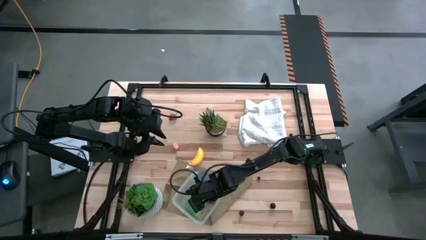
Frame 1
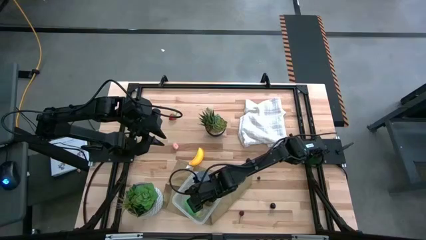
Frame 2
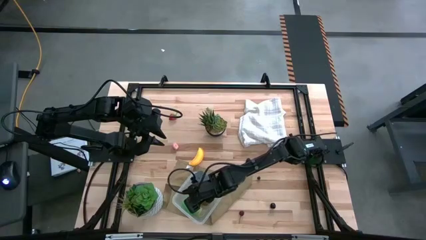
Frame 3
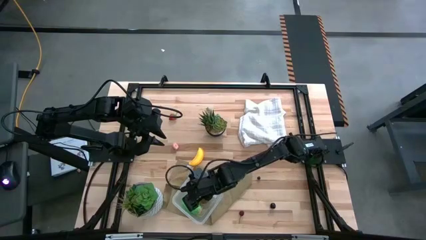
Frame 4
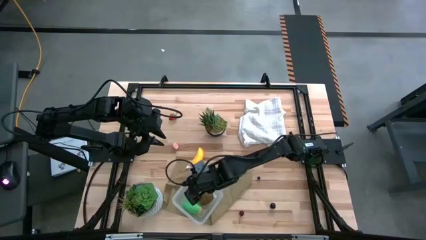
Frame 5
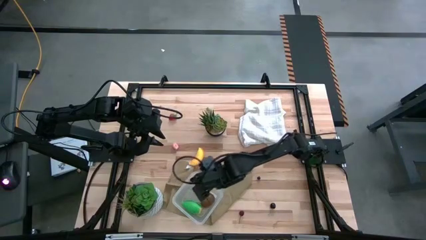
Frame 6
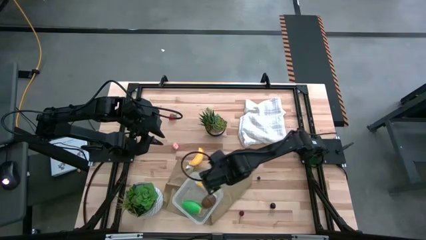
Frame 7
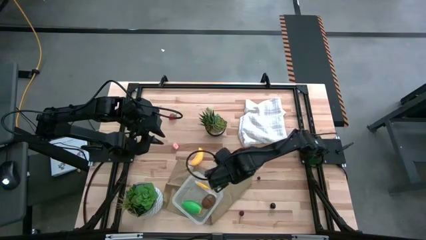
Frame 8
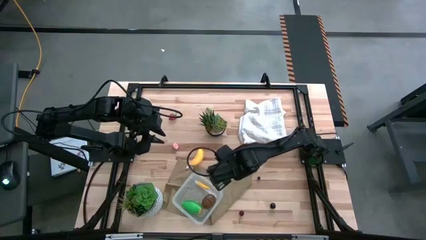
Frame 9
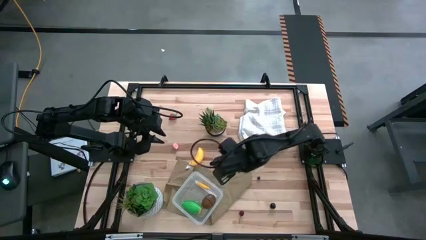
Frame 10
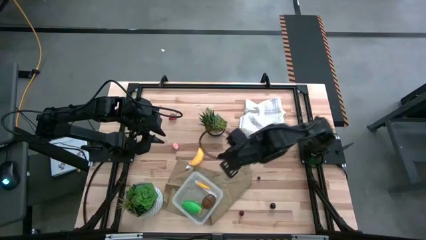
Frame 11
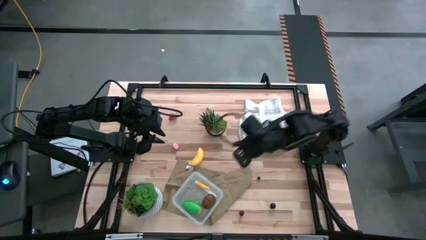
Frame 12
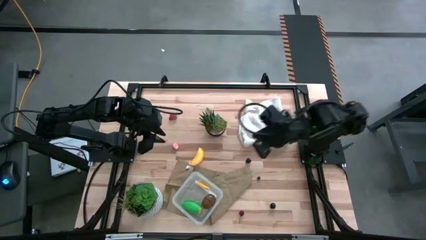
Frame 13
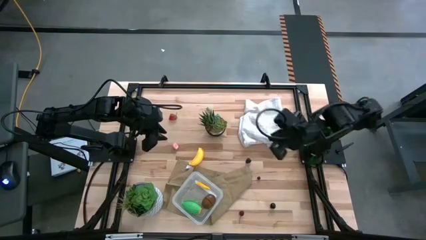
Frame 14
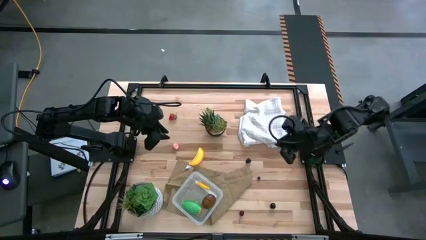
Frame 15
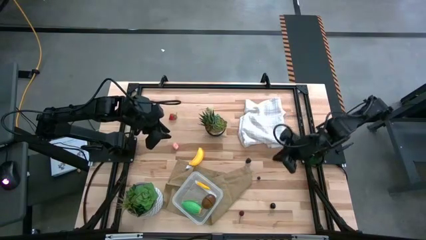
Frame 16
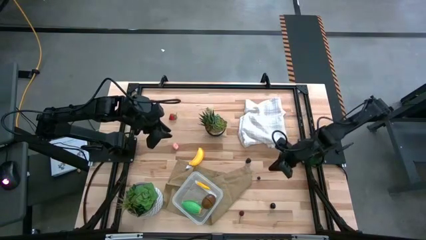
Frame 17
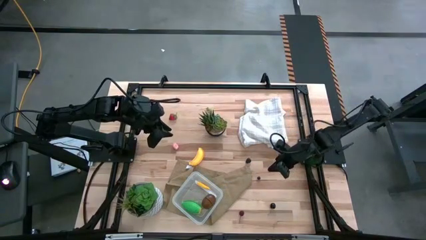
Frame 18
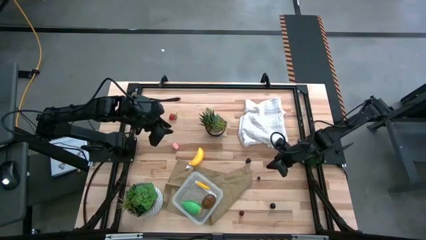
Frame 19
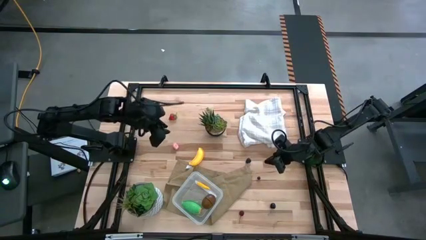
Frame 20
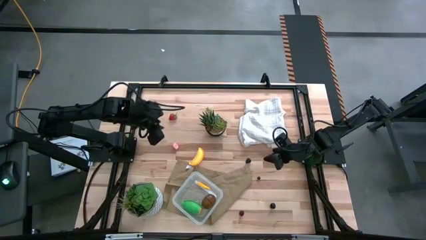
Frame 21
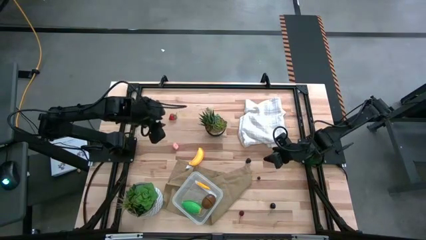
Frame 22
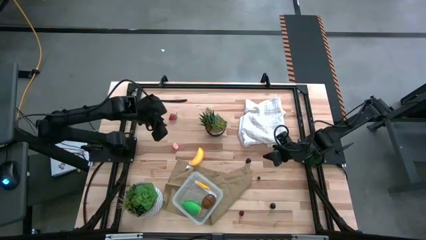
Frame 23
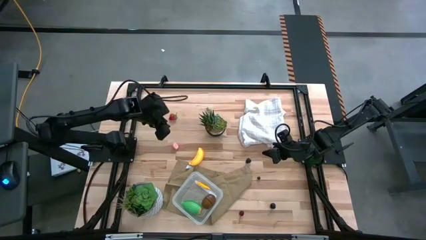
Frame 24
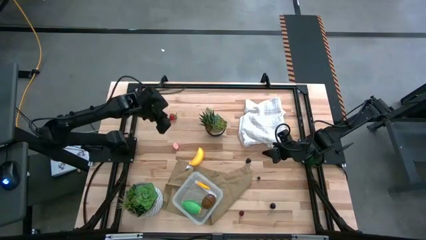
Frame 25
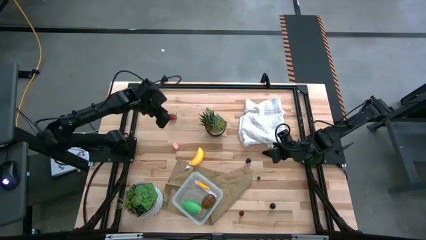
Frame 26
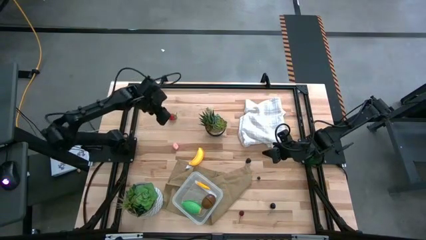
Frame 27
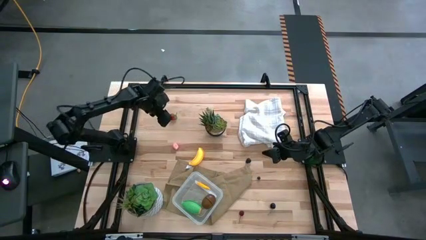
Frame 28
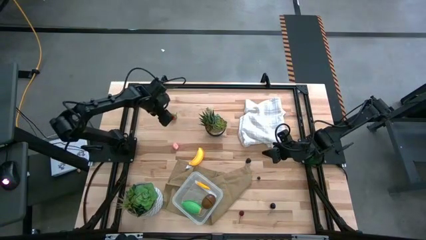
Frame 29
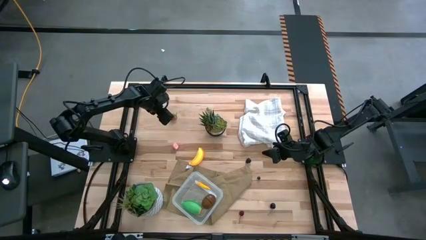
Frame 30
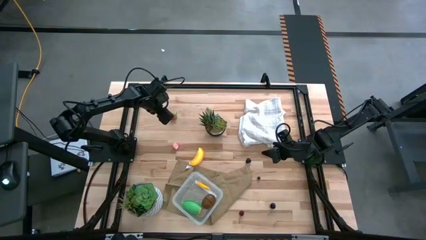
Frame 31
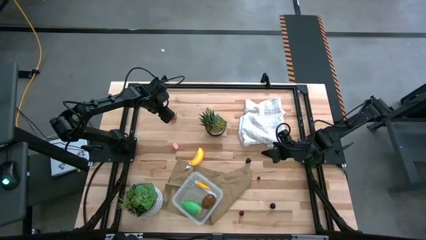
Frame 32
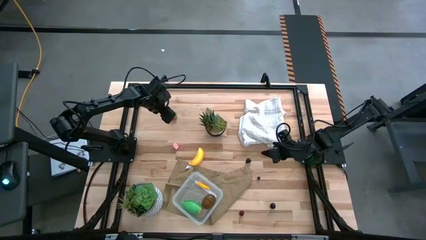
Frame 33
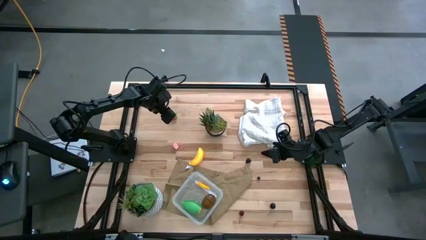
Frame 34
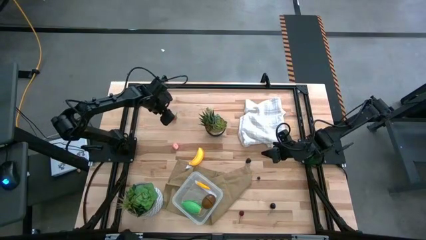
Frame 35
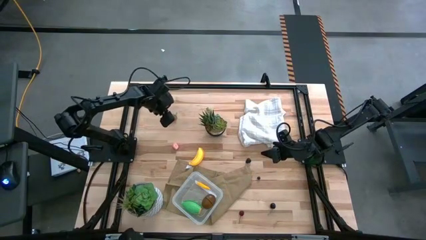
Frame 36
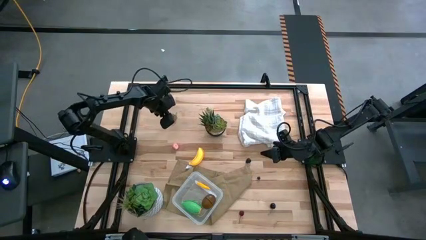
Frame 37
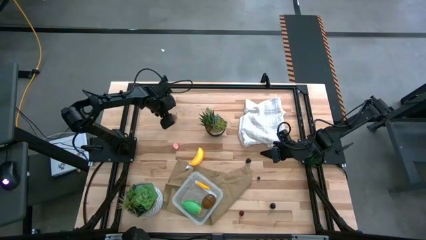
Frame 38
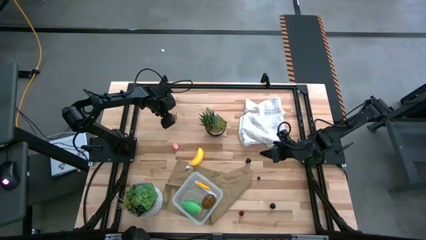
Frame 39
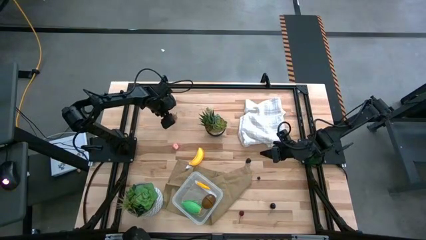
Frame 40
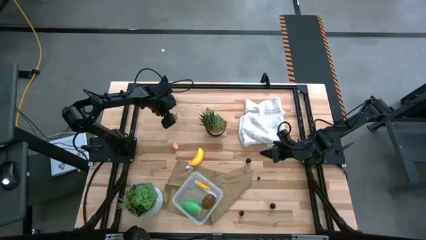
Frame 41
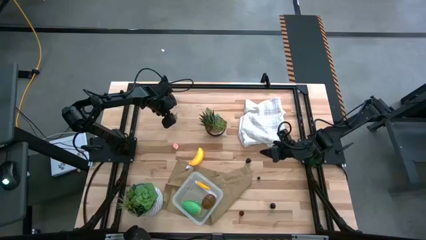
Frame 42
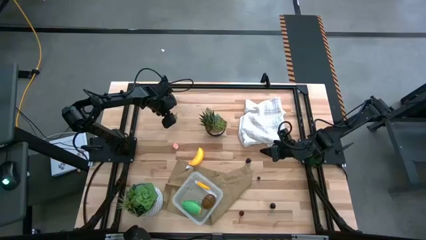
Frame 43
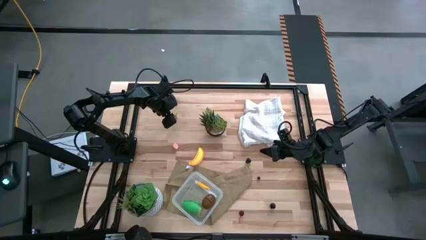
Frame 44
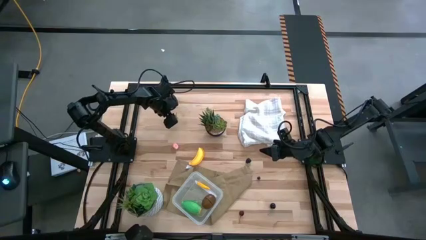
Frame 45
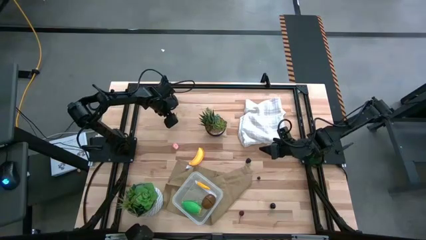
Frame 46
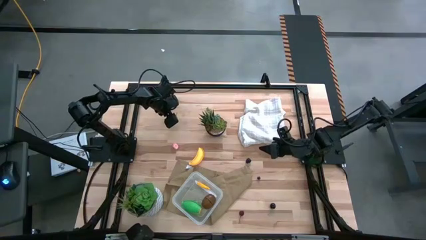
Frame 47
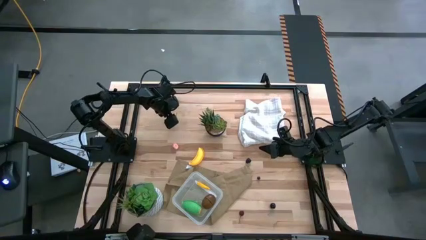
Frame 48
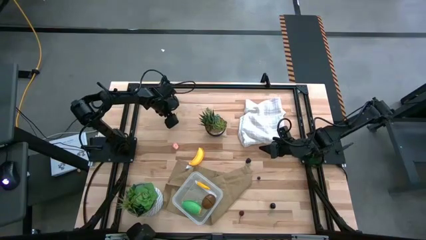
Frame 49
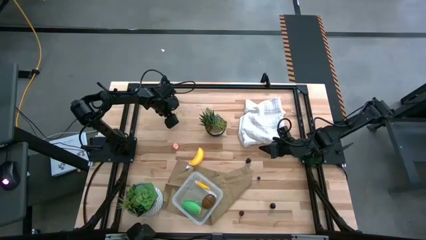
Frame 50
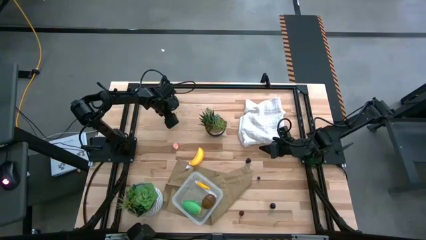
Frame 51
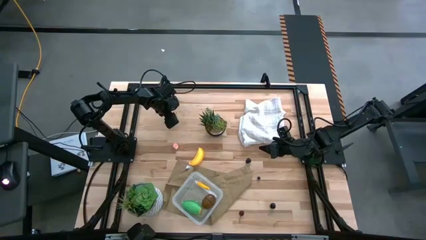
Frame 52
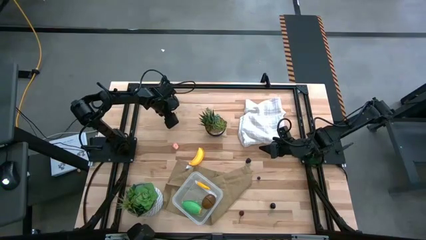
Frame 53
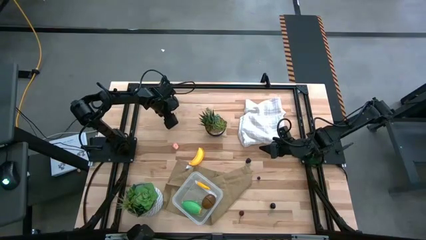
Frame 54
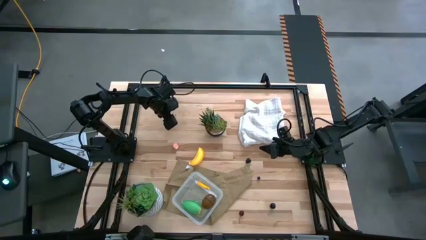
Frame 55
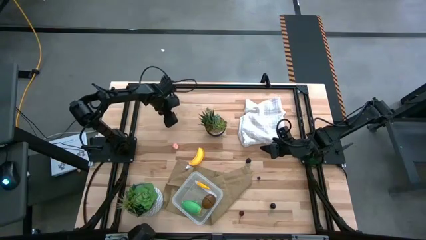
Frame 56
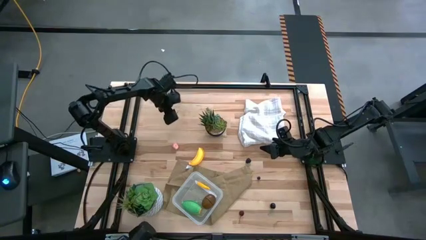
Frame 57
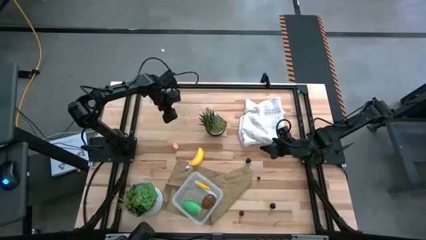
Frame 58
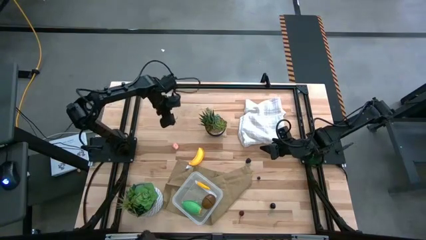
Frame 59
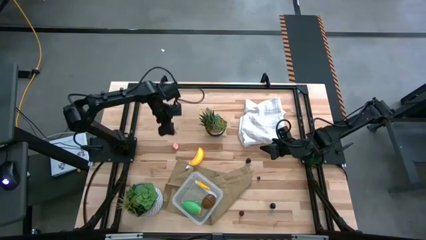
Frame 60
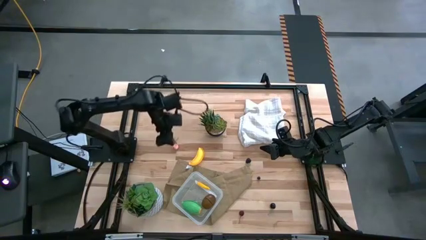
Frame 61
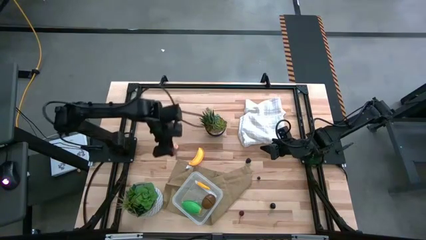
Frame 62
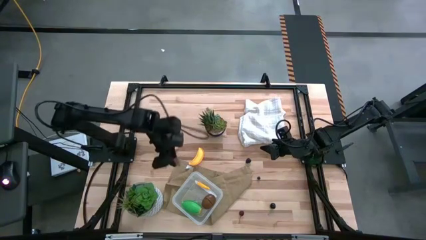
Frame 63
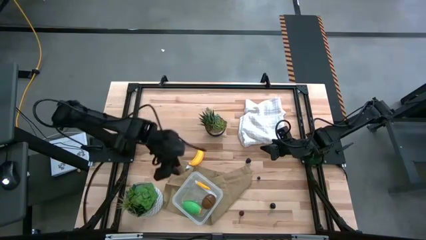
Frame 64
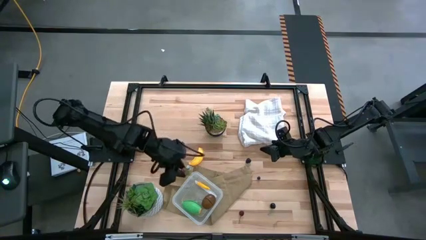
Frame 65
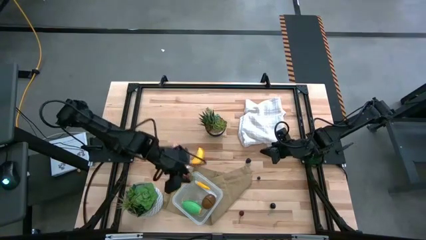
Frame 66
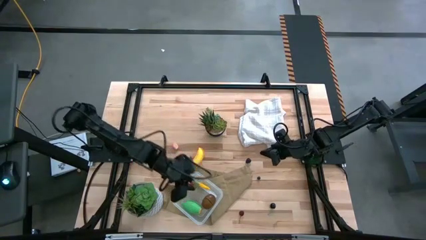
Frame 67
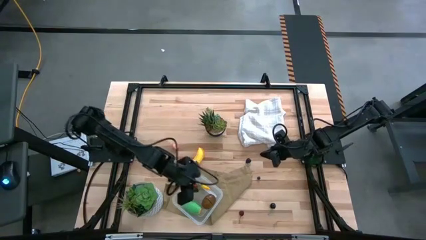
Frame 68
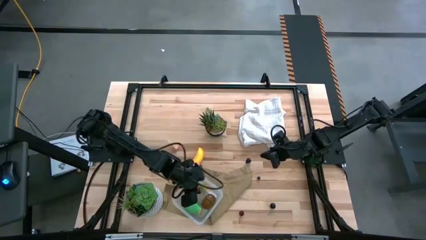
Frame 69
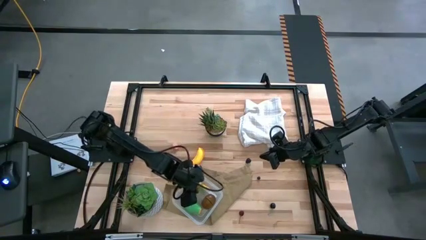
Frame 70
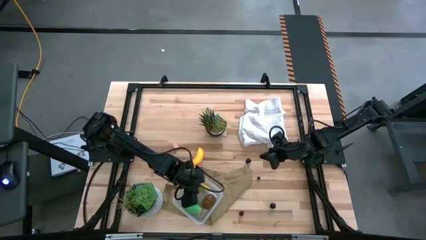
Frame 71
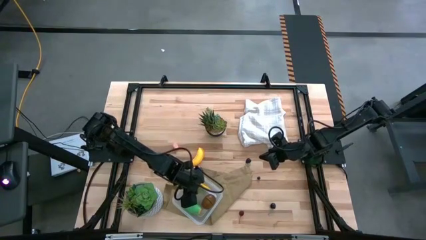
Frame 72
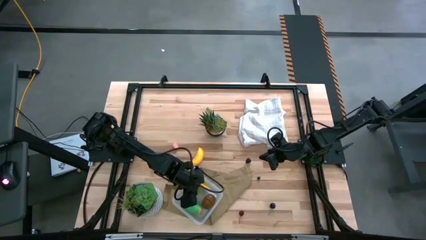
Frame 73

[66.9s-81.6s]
Task: Pick and placing Produce into tupperware
Put the strawberry into the container

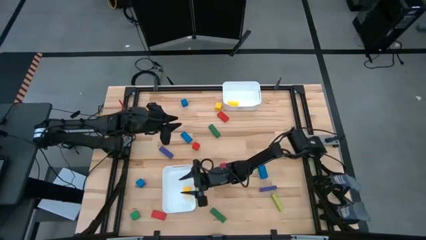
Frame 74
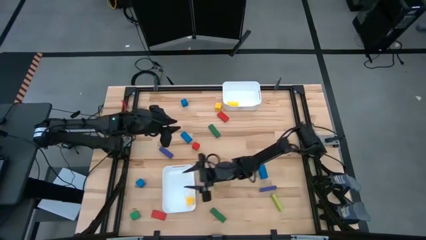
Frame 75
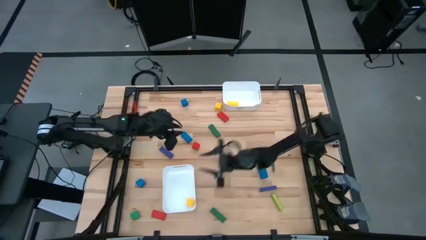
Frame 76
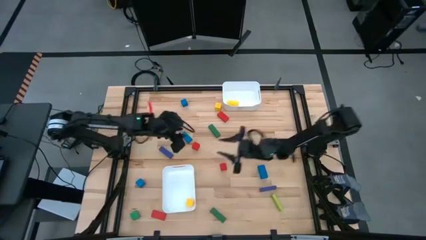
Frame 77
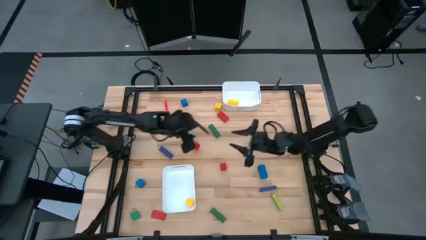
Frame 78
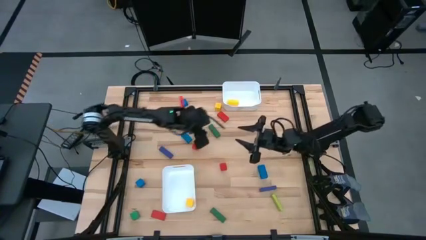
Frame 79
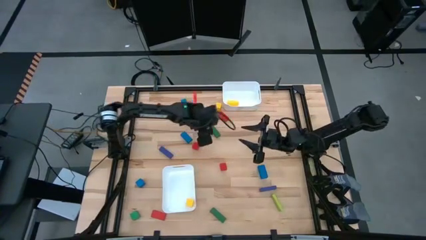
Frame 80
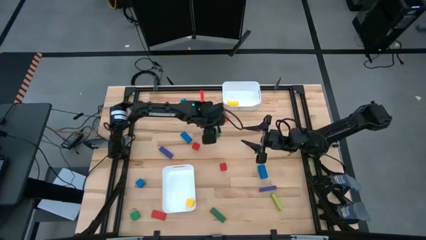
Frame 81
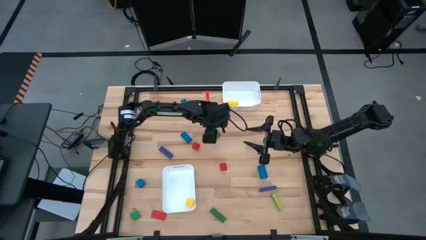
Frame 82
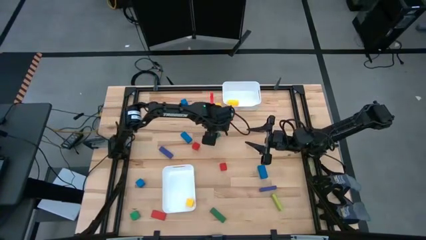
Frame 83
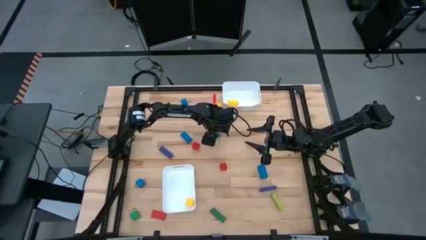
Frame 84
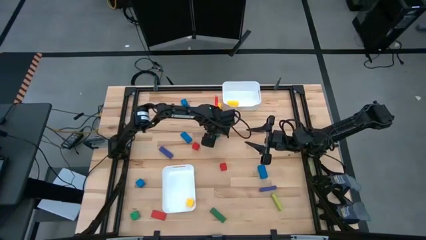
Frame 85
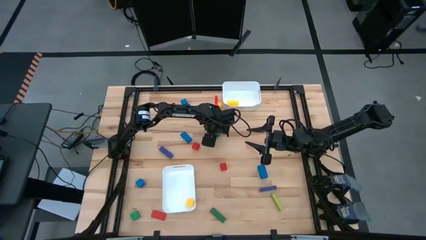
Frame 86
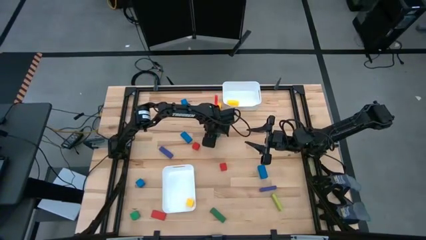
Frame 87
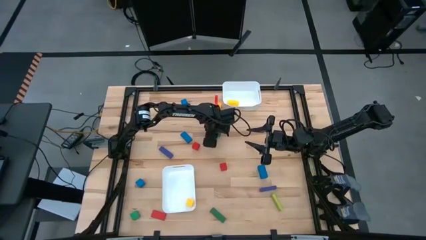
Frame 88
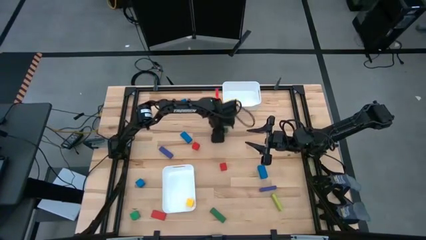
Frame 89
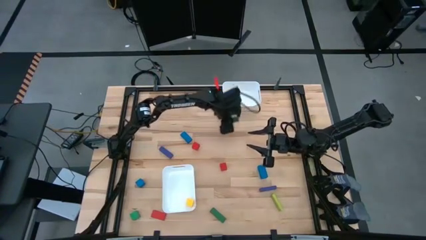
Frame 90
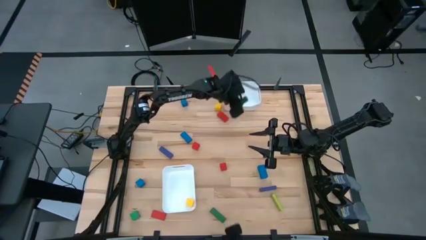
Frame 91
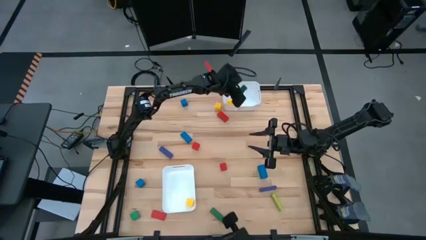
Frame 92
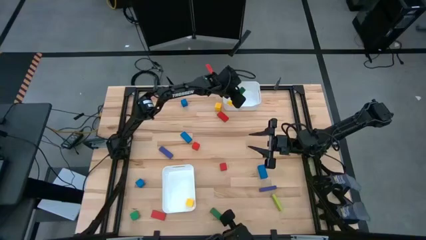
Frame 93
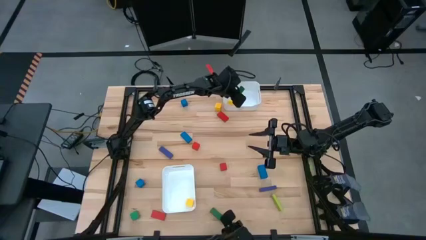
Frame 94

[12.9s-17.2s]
Task: Sort blocks by size
Put the green large block into the top white bin
